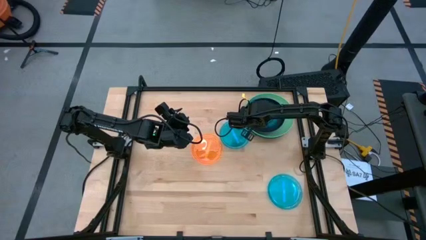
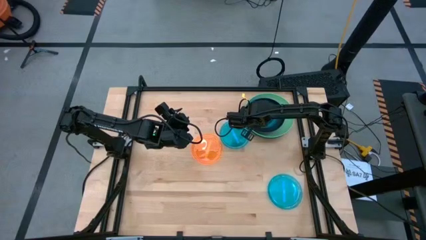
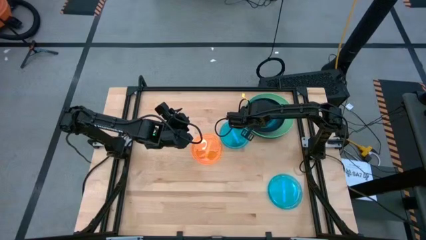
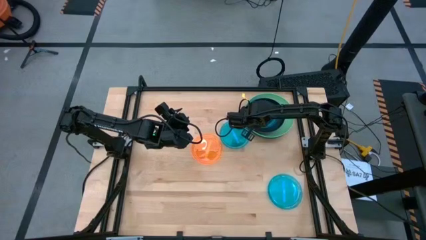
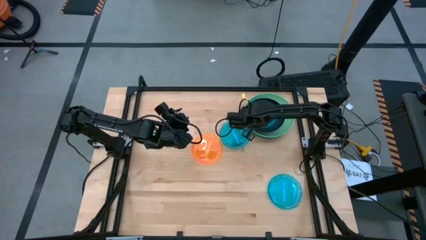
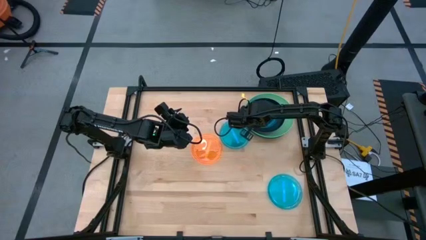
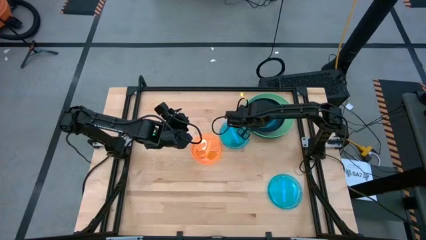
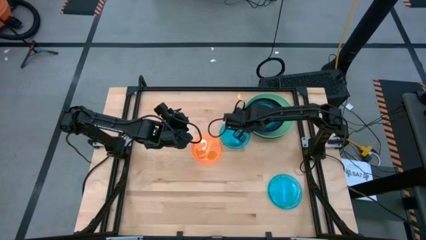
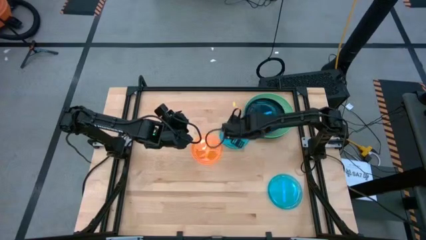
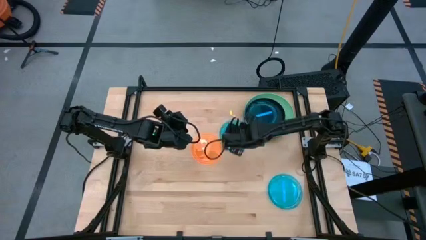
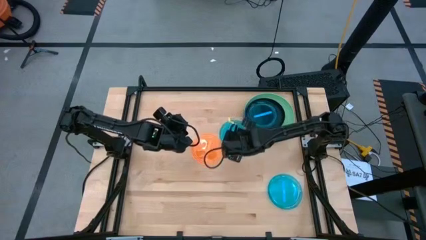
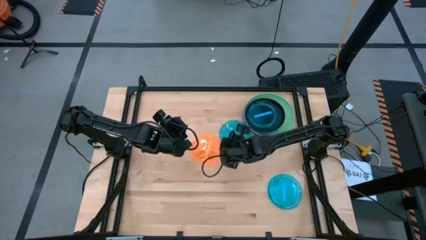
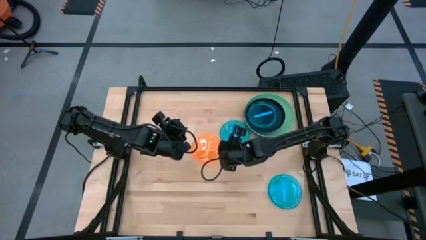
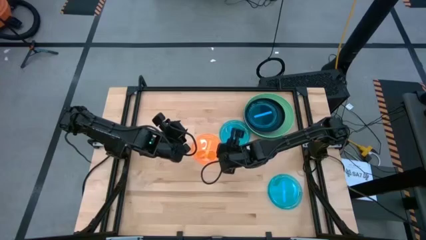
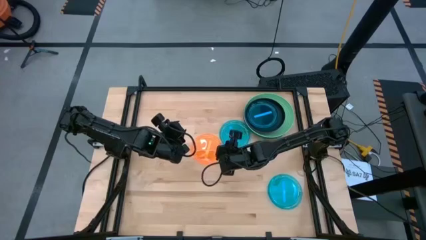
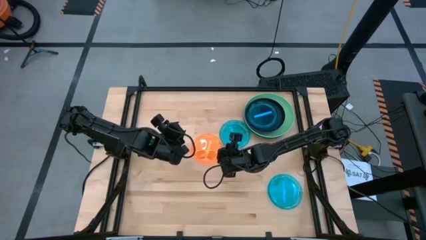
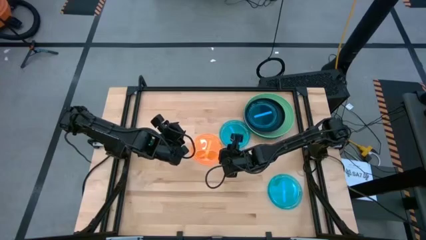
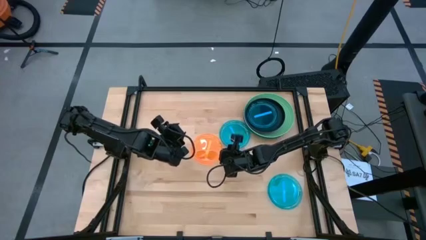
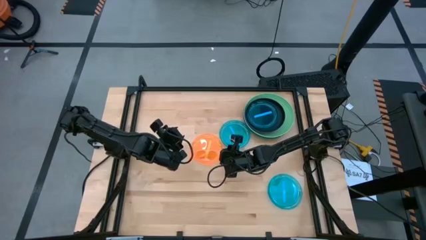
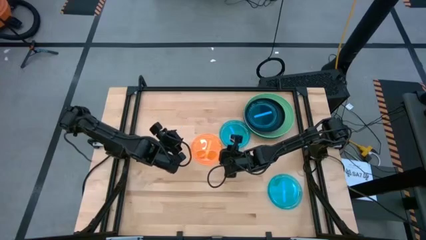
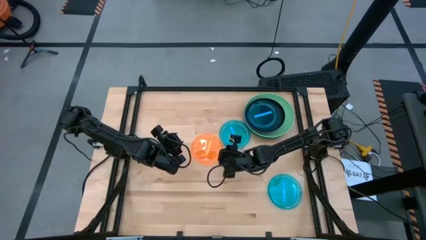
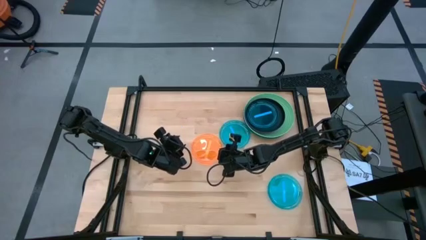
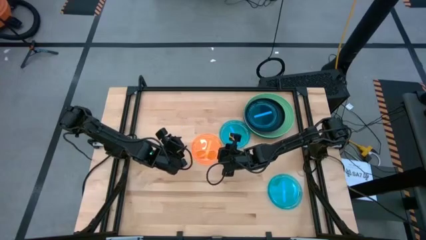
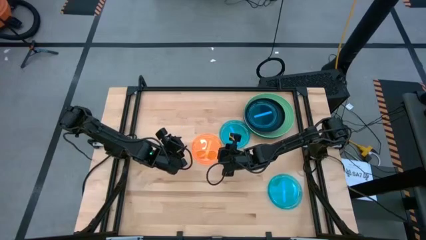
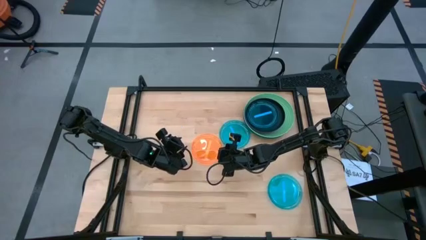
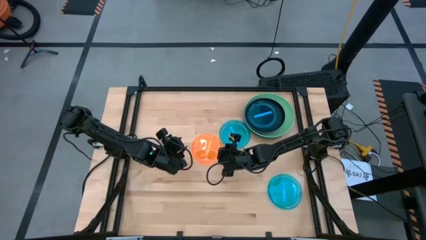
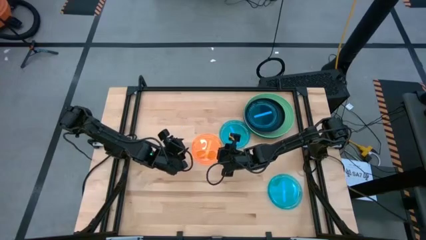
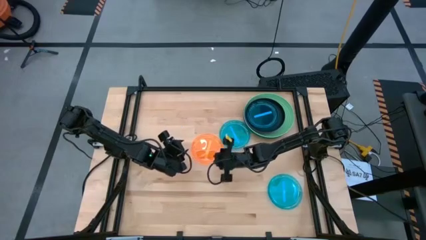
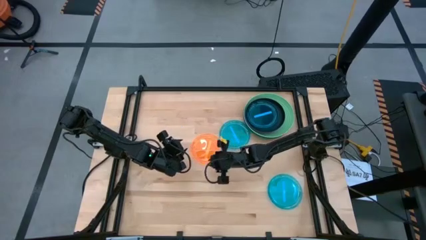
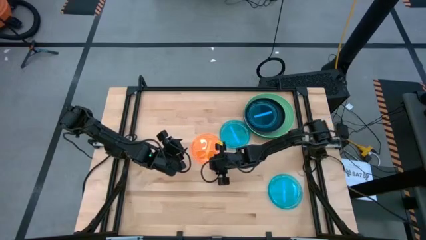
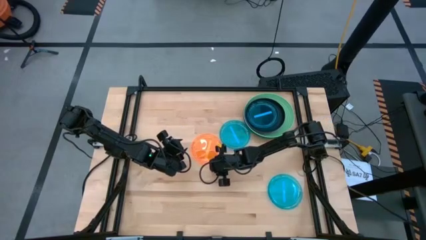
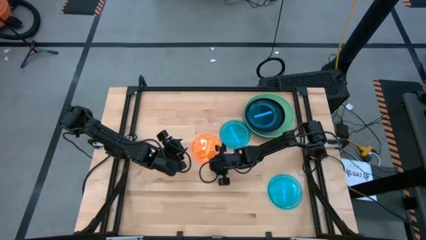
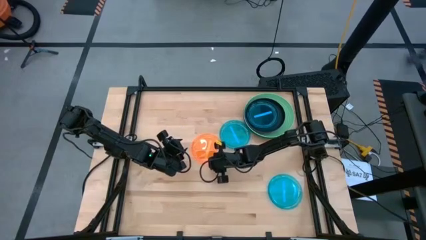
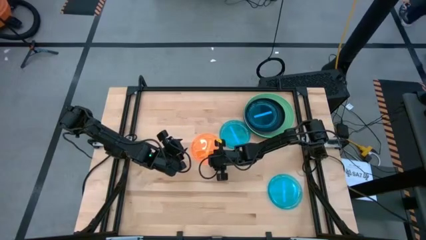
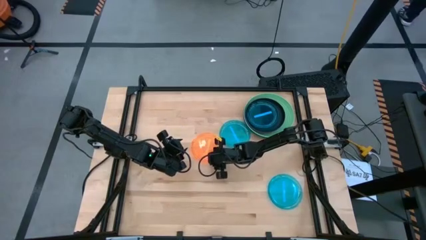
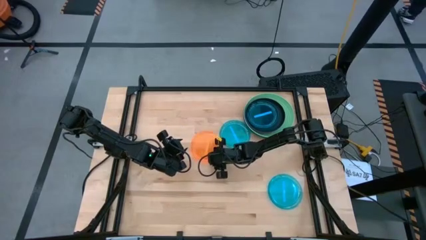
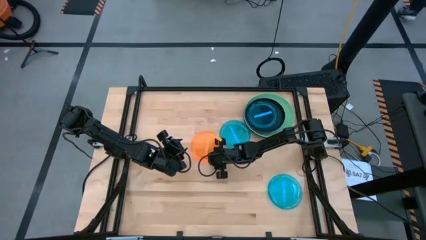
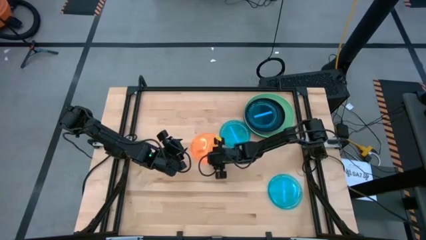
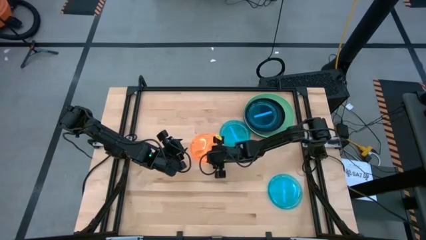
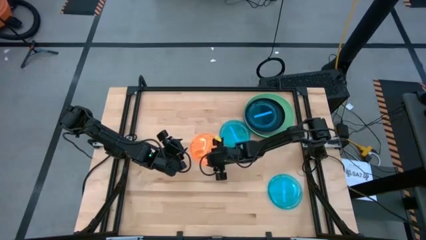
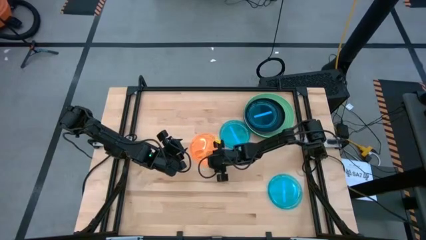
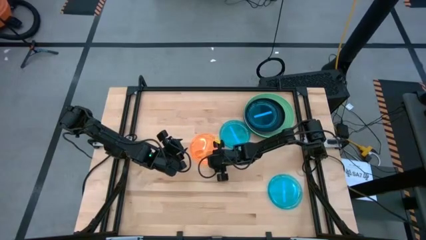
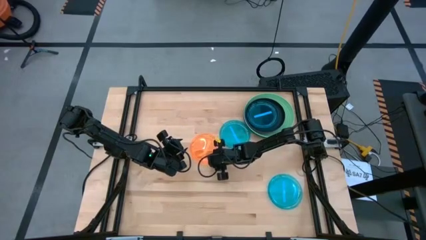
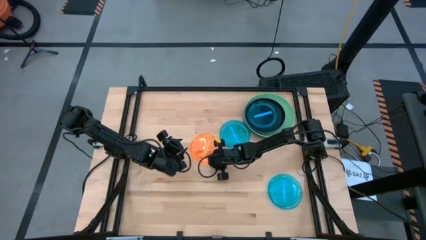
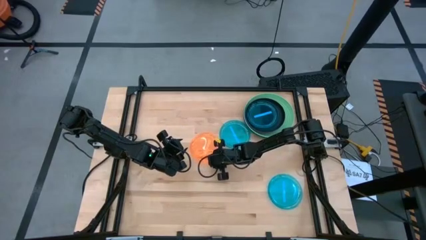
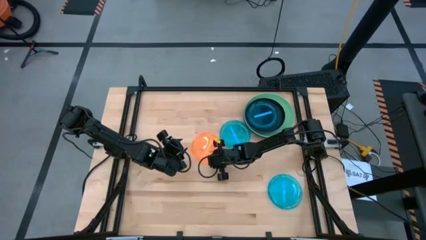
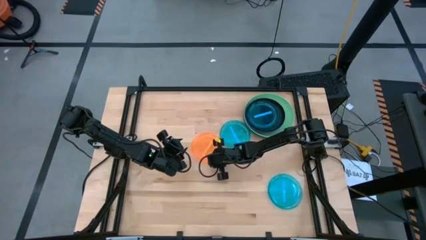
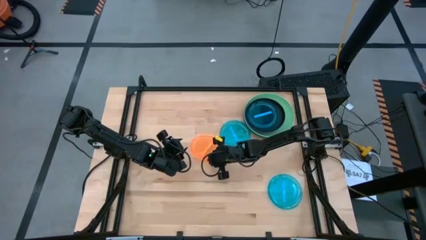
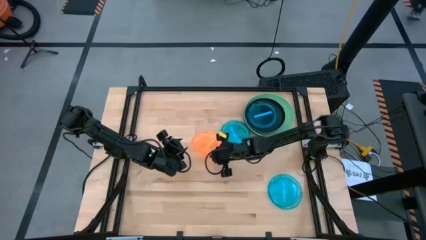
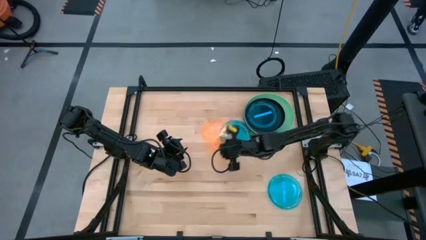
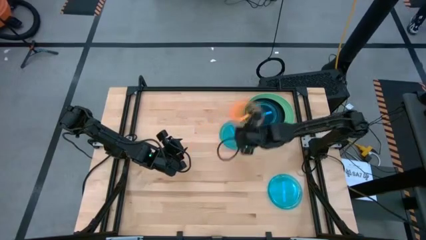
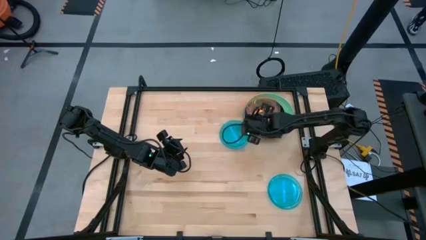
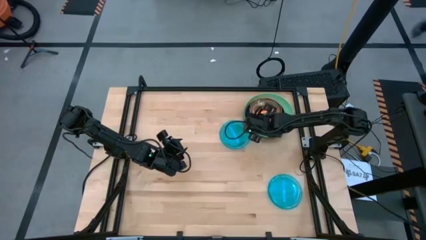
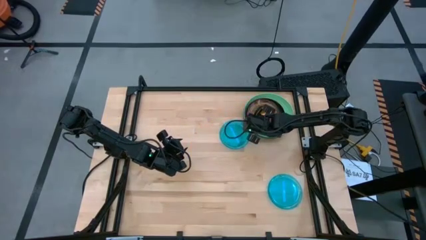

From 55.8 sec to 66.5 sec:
Task: Stack plastic plates
Stack the transparent orange plate on the transparent blue plate

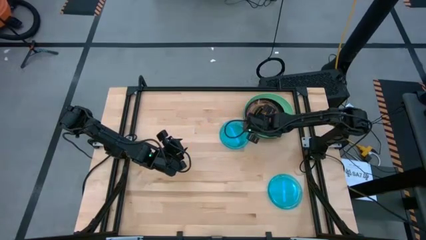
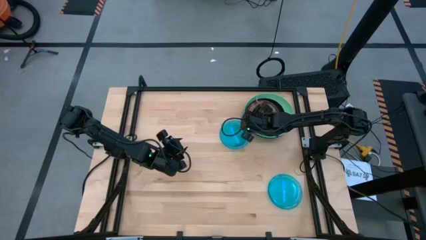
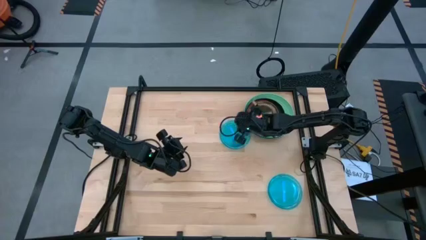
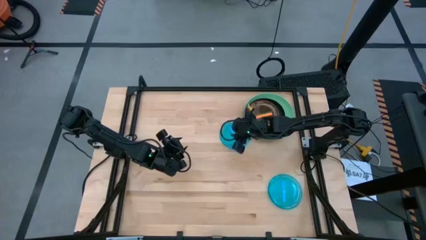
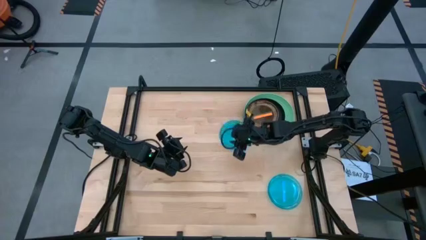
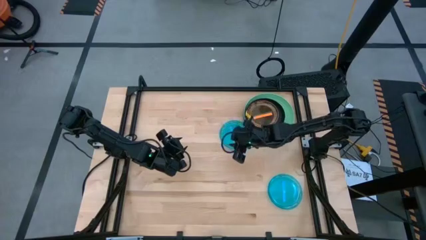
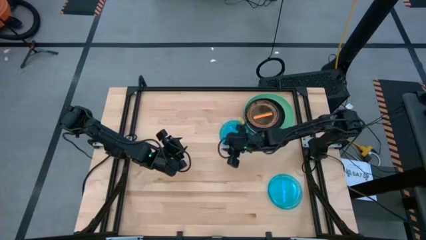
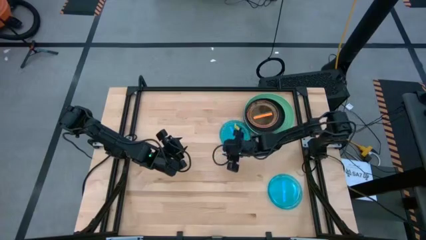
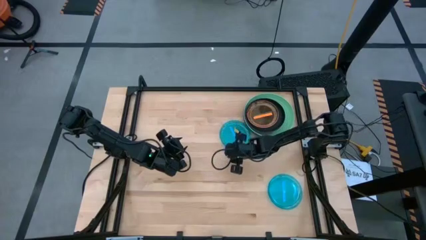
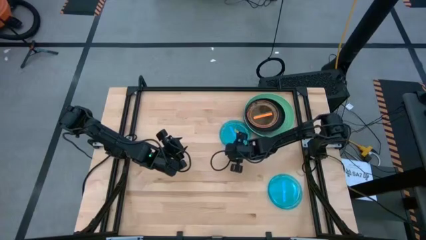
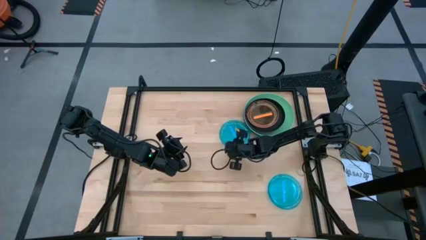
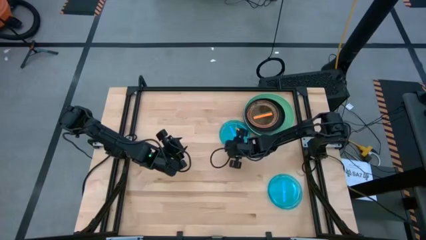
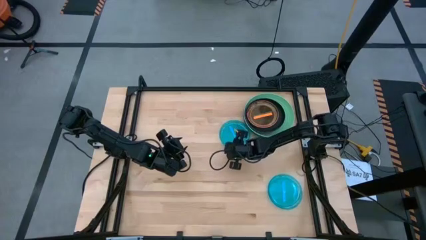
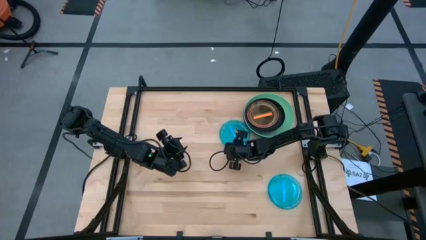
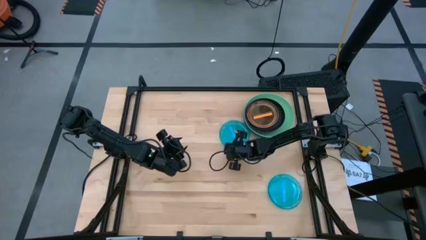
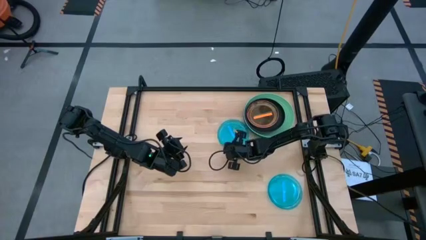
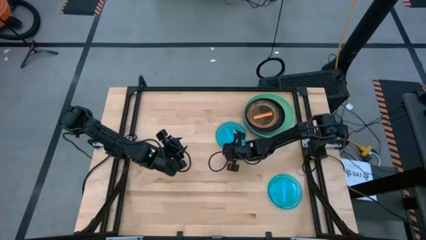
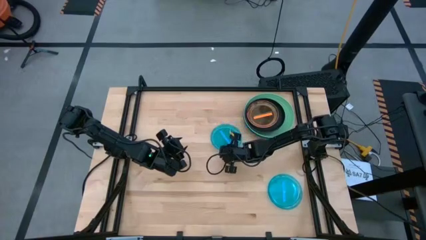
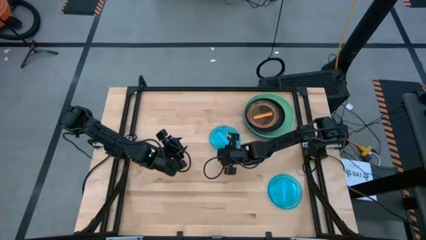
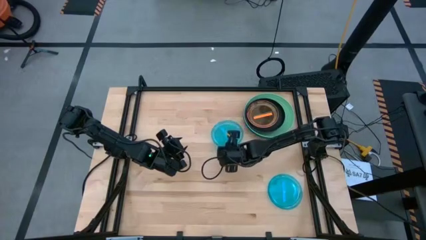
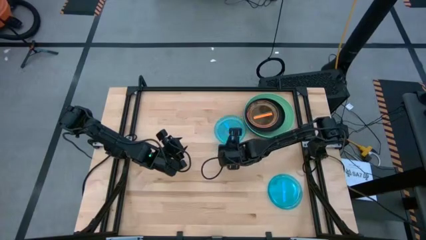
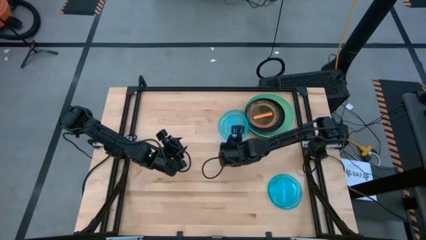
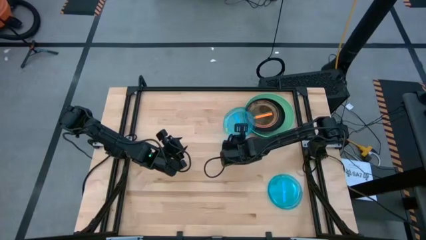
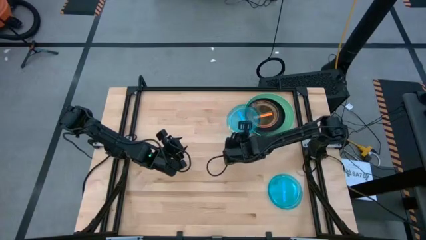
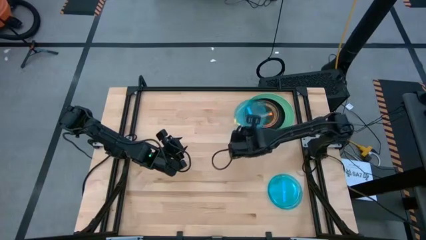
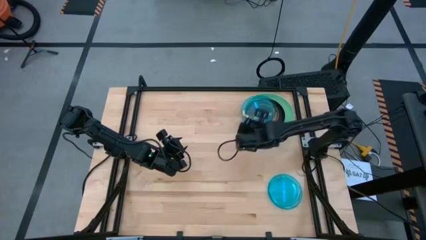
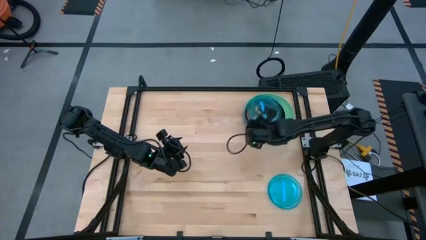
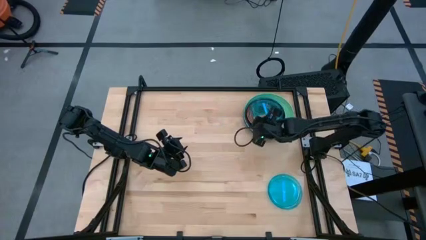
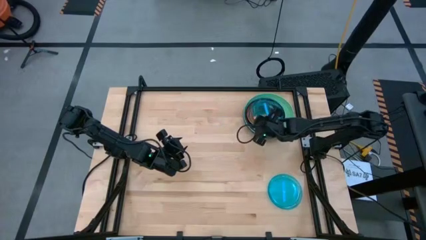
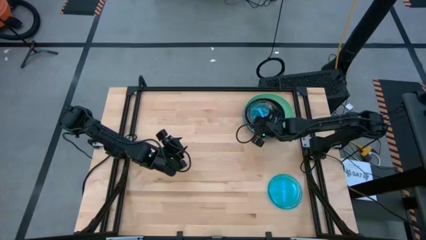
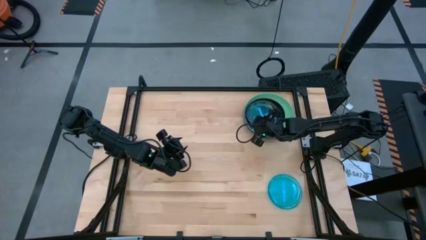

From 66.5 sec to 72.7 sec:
Stack the transparent blue plate on the transparent orange plate
